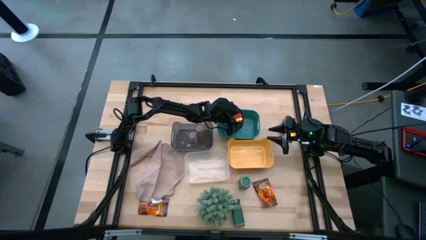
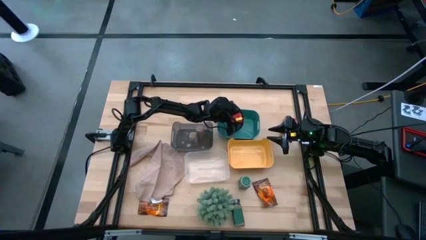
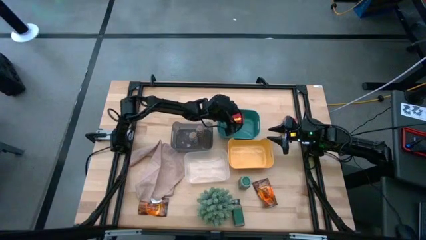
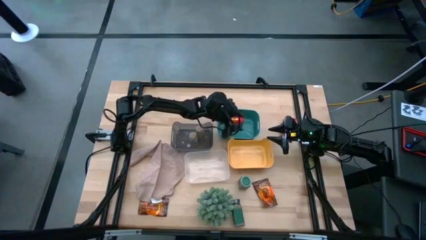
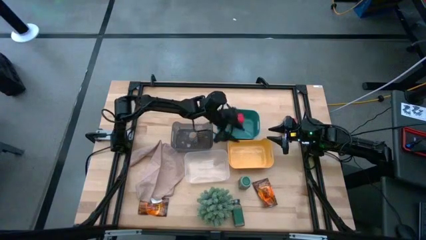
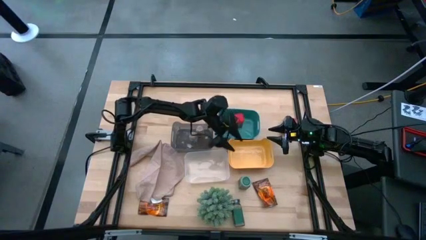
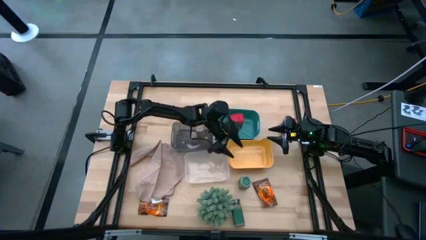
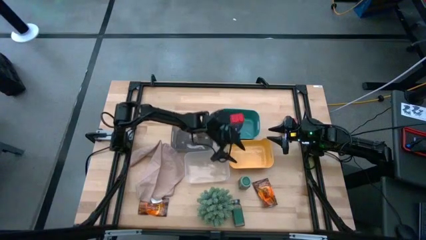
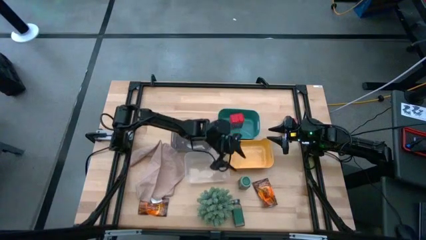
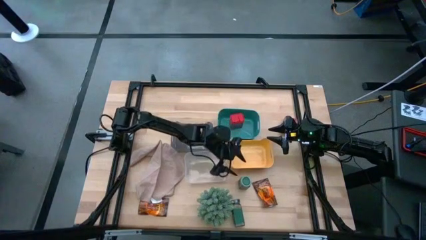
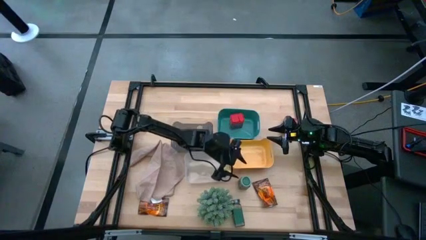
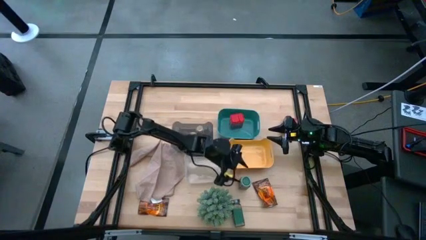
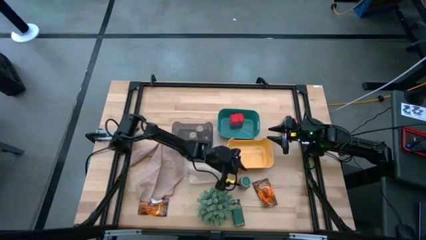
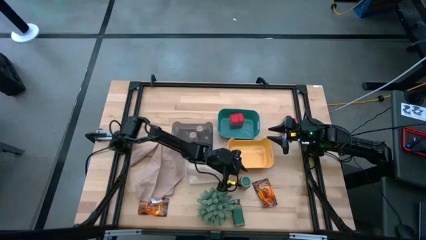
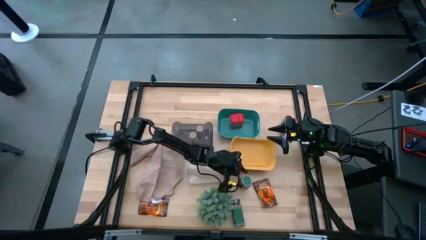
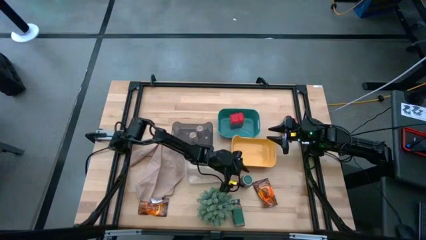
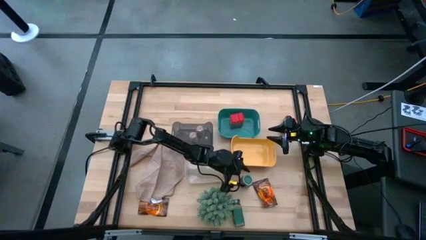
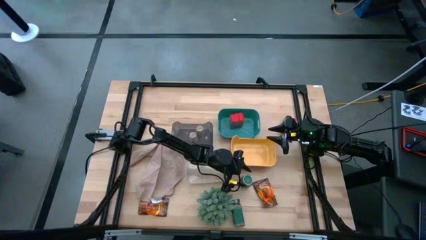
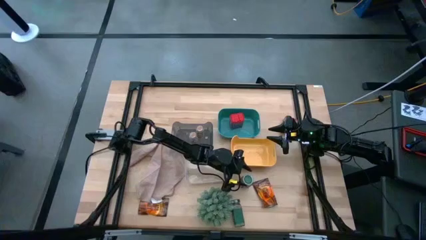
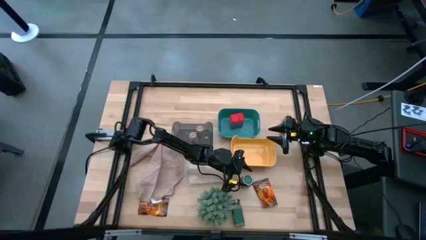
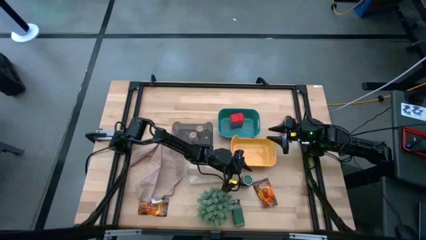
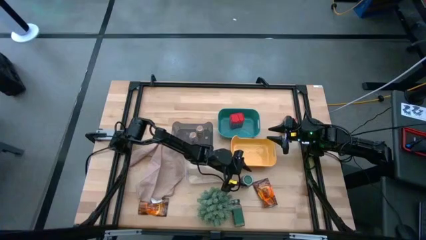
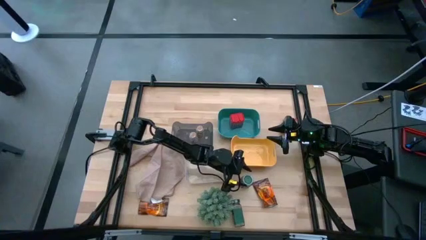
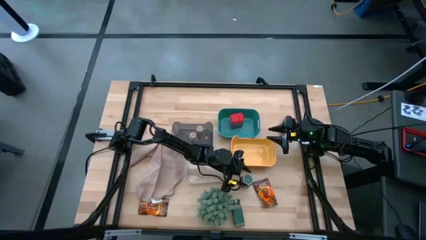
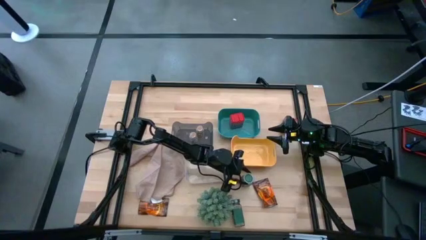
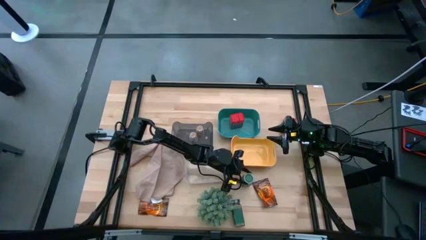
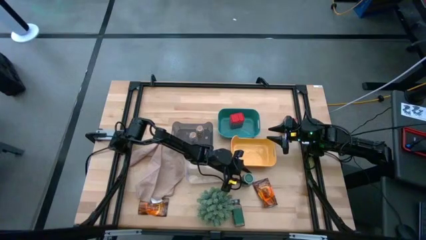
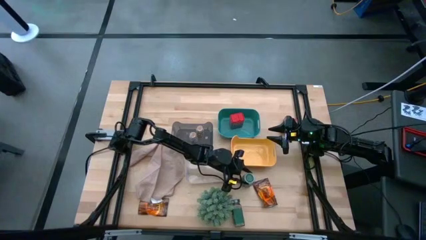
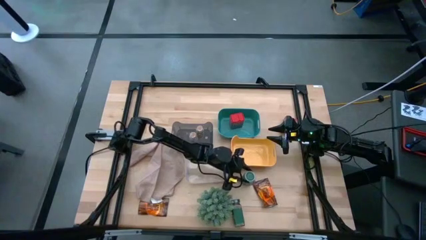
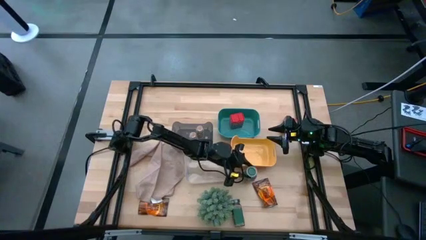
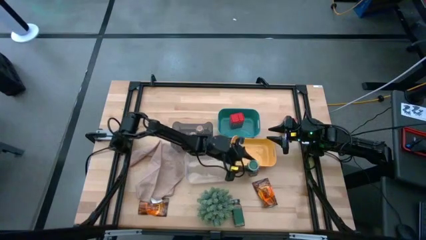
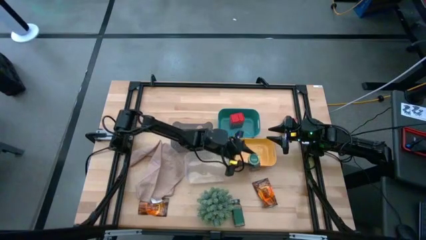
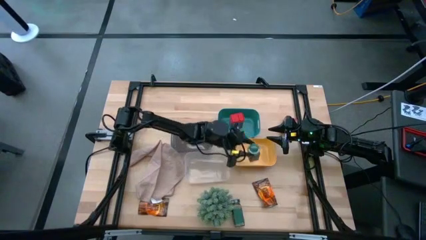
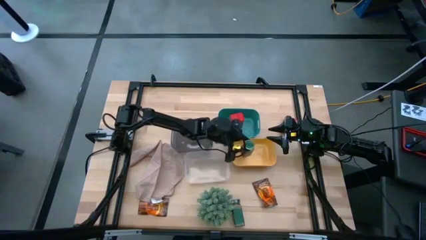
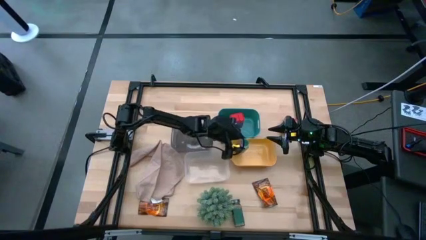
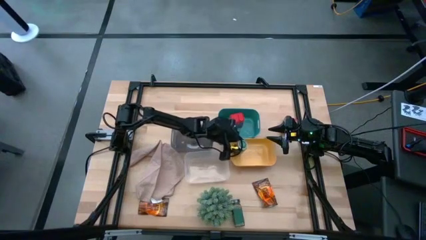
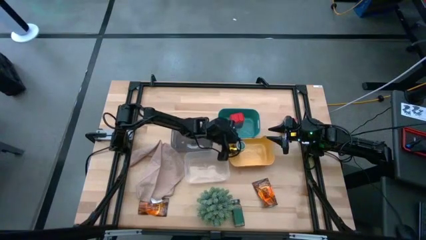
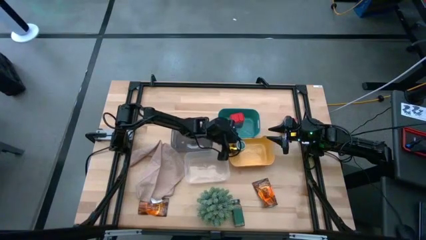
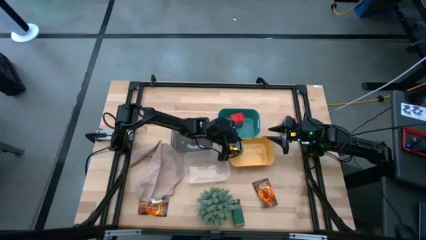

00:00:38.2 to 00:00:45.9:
Task: Sort spices by type
Put the top green seasoning bottle into the yellow bin

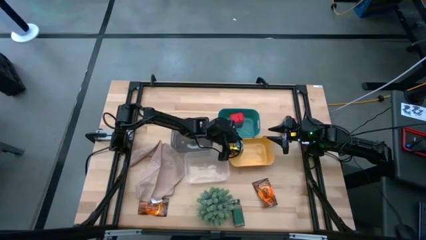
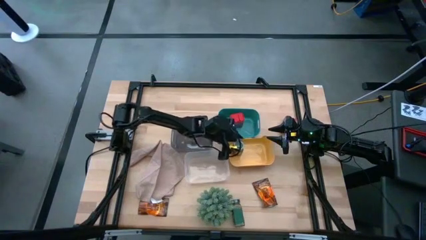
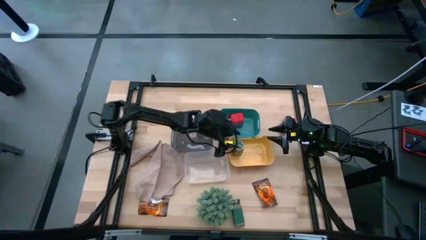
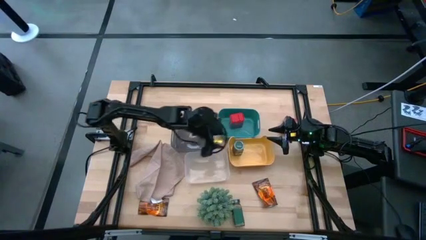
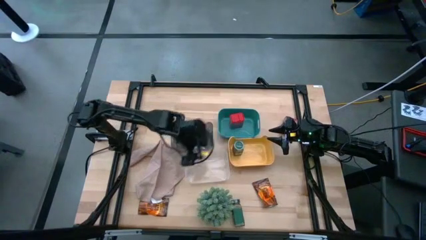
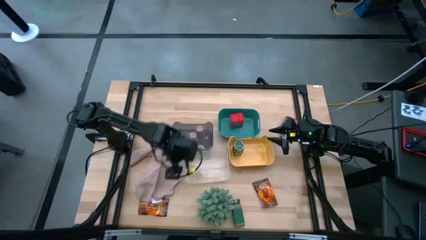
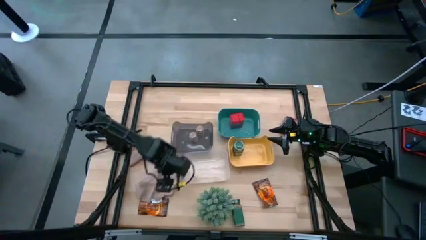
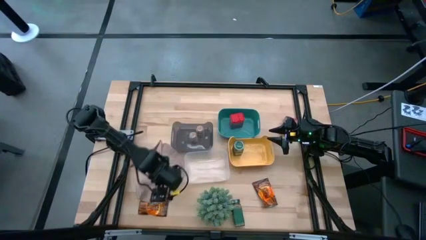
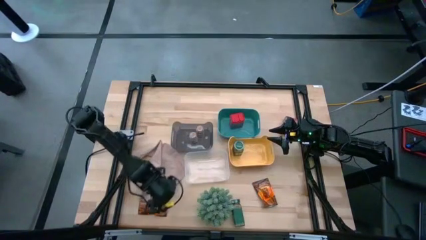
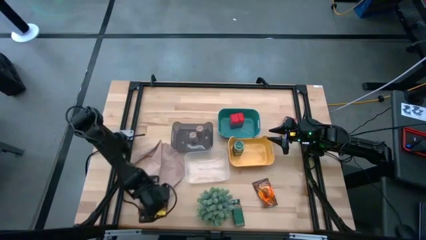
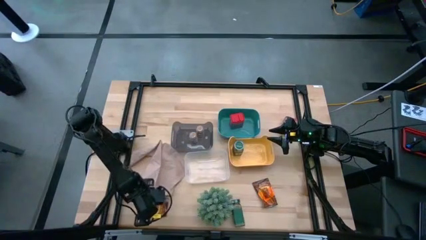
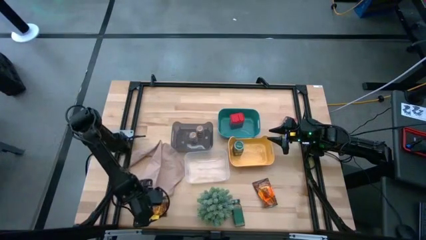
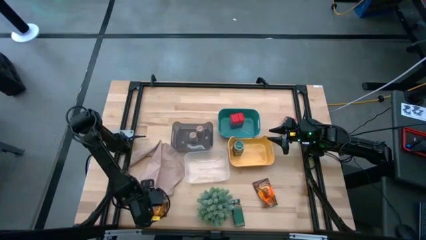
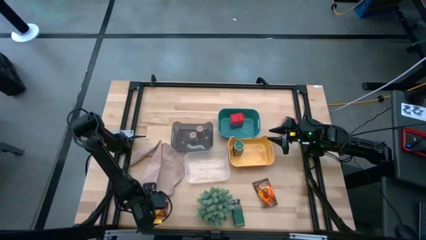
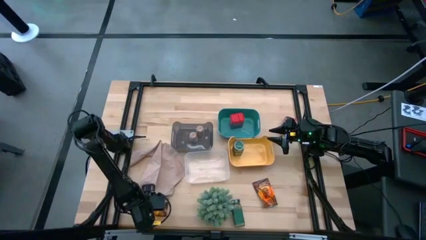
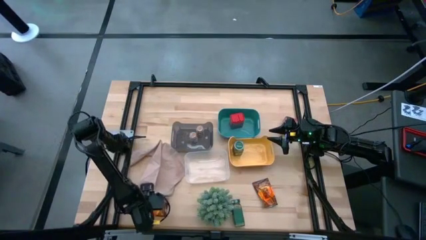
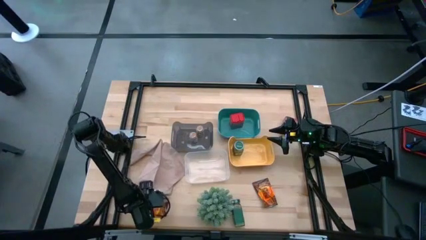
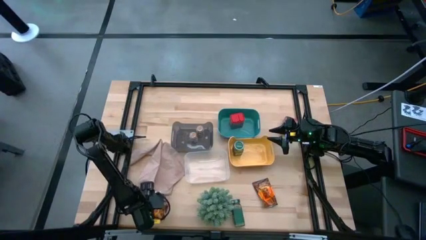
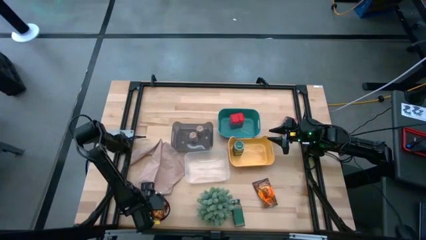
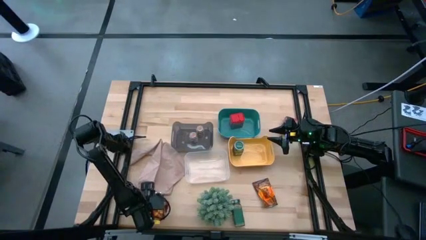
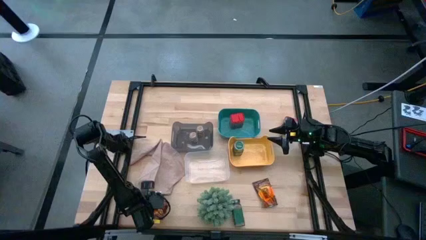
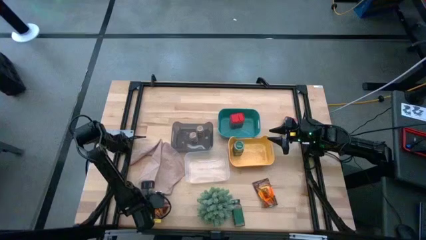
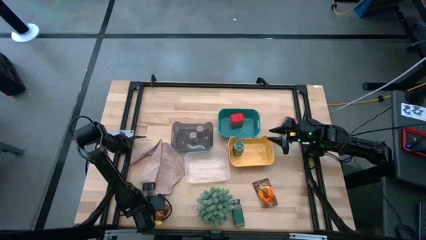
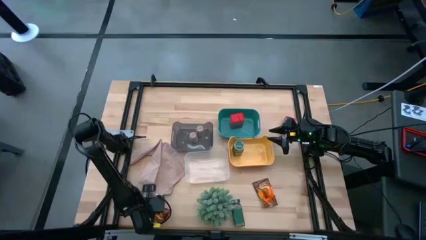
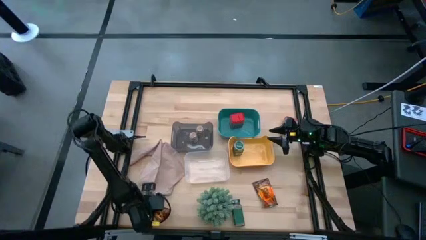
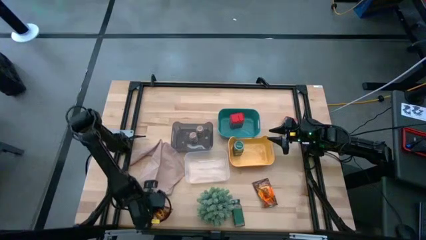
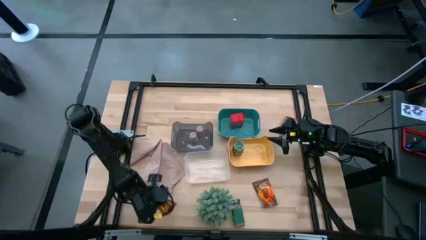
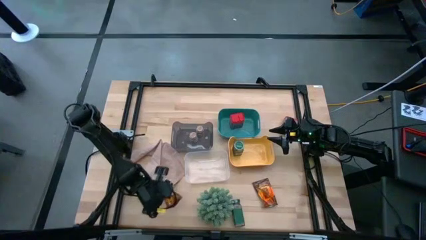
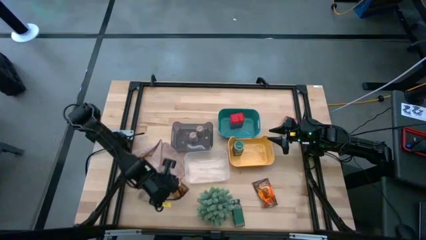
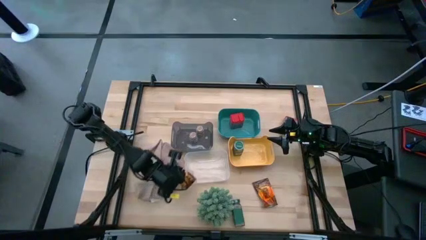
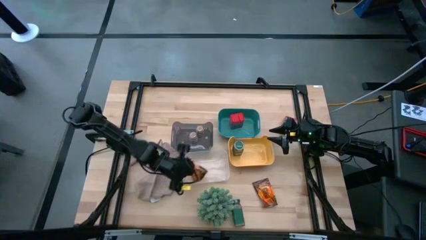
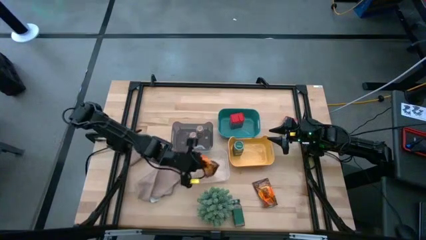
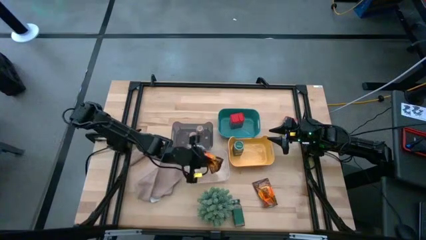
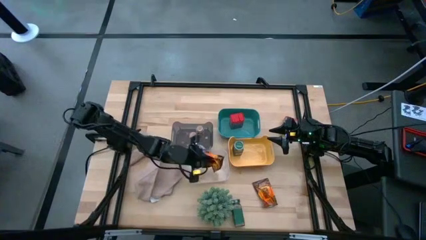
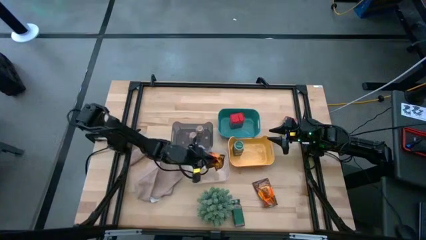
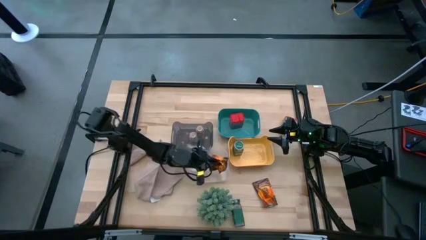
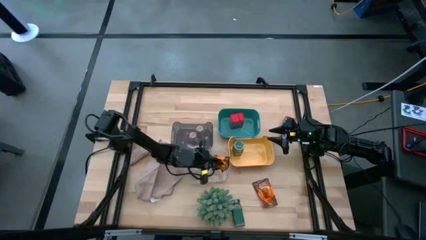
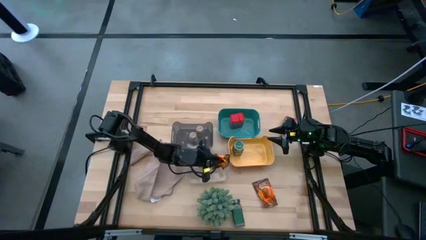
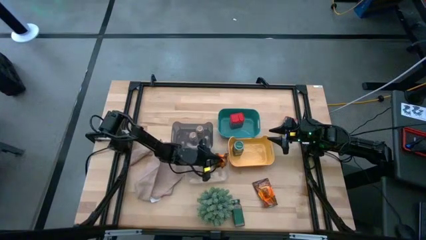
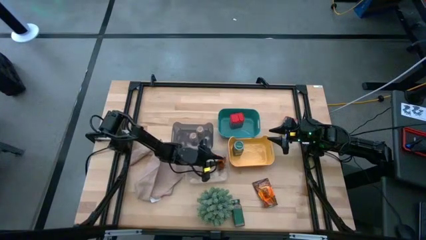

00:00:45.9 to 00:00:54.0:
Put the left orange seasoning pack into the transparent bin
